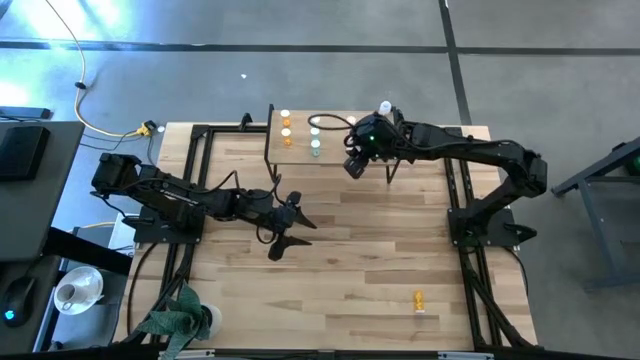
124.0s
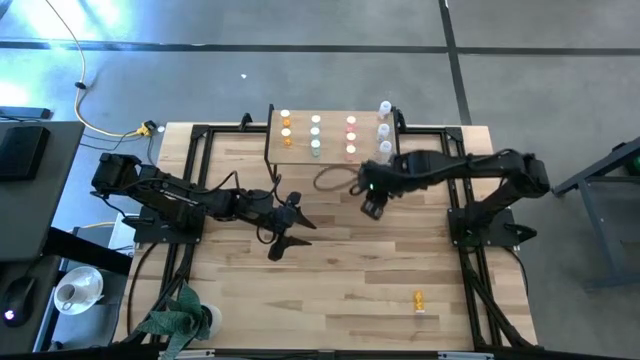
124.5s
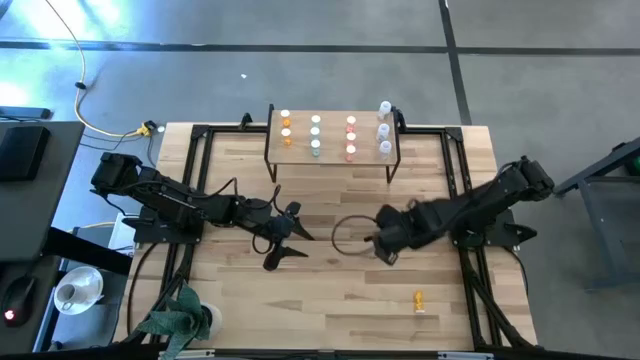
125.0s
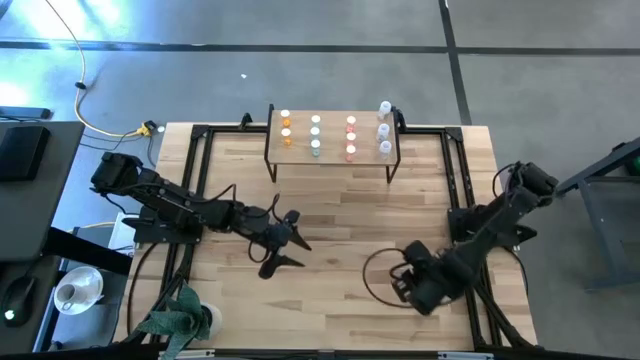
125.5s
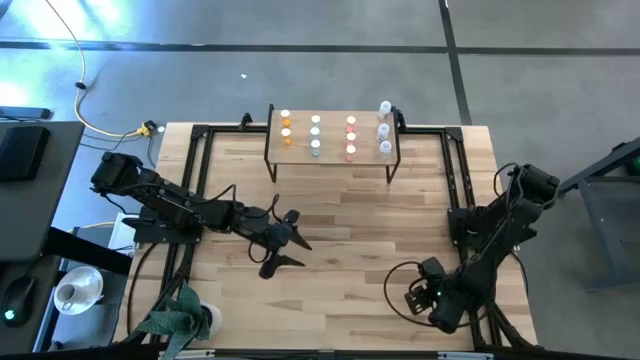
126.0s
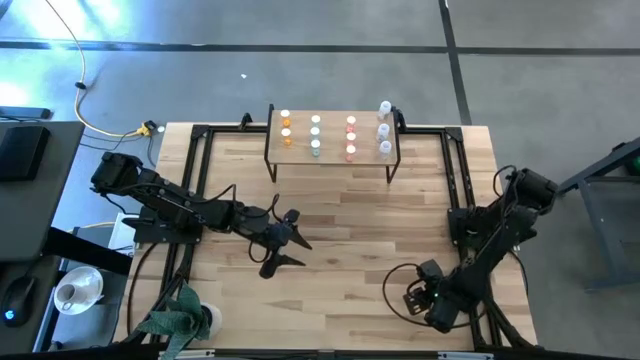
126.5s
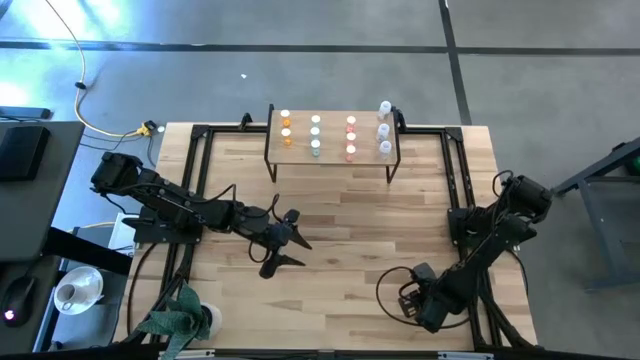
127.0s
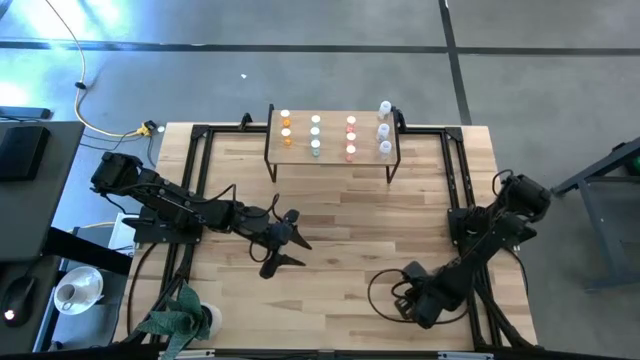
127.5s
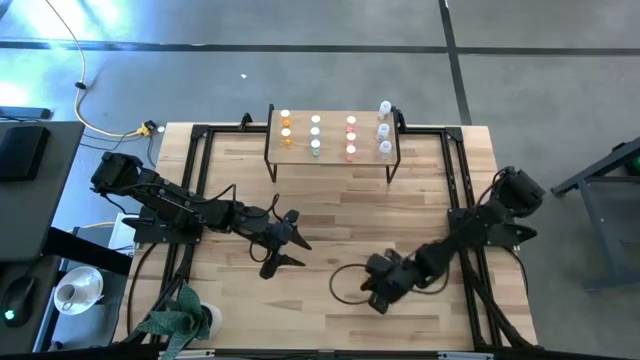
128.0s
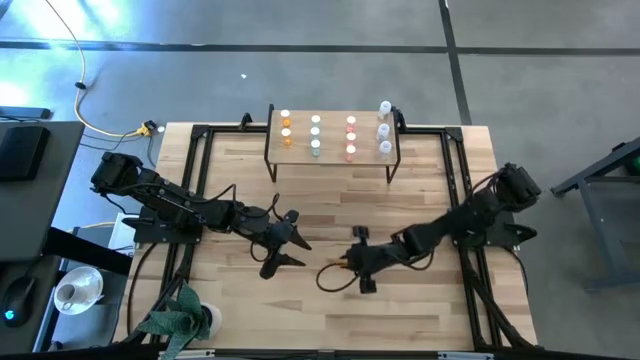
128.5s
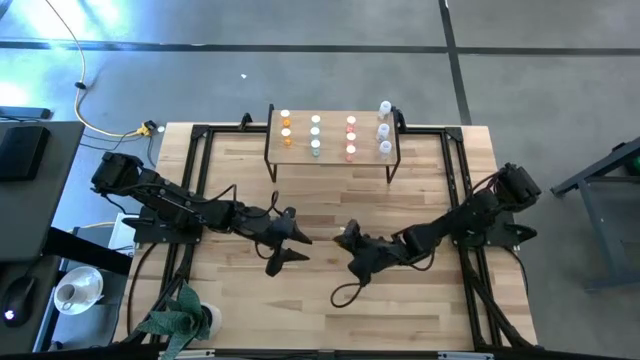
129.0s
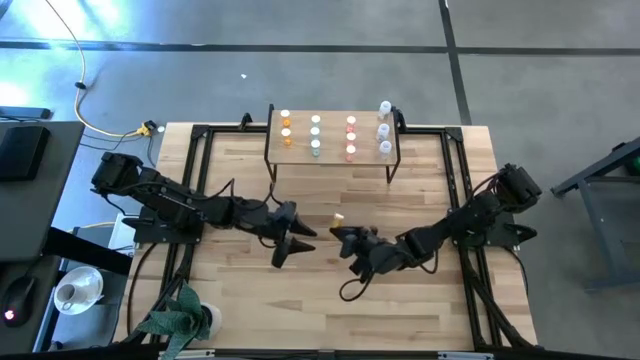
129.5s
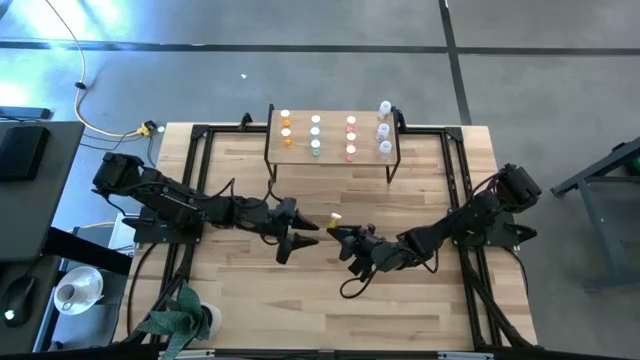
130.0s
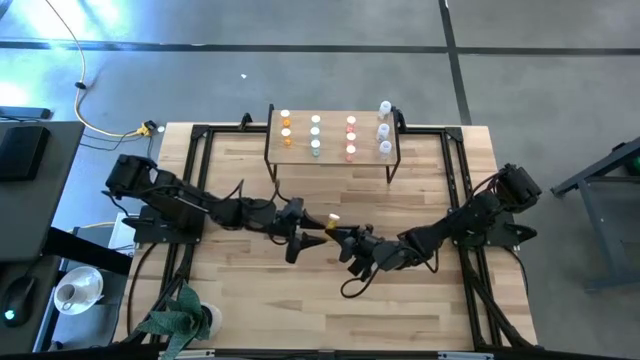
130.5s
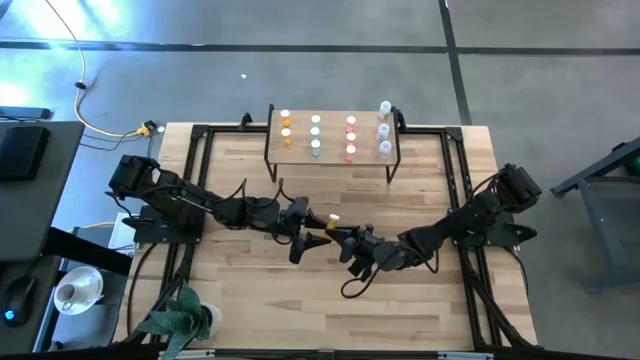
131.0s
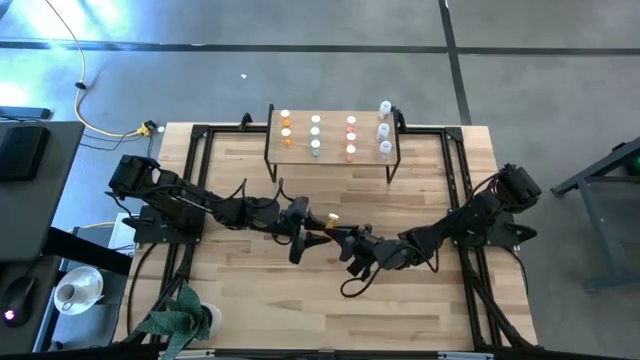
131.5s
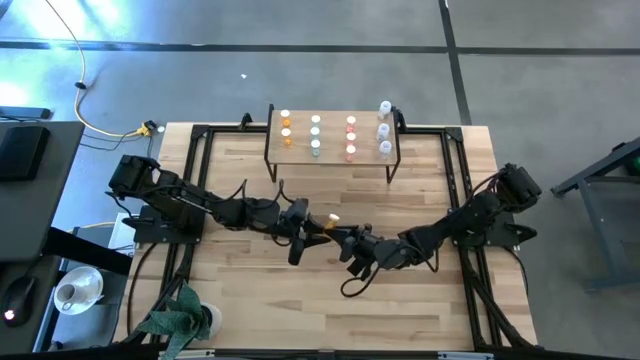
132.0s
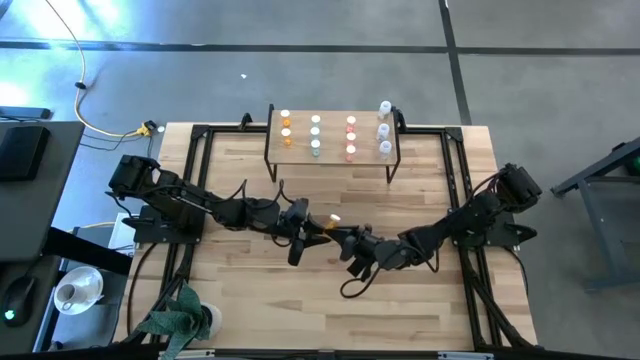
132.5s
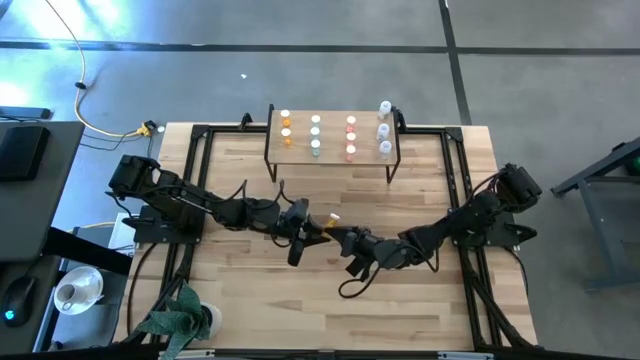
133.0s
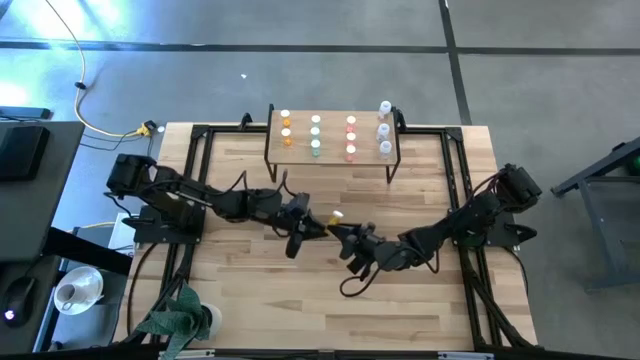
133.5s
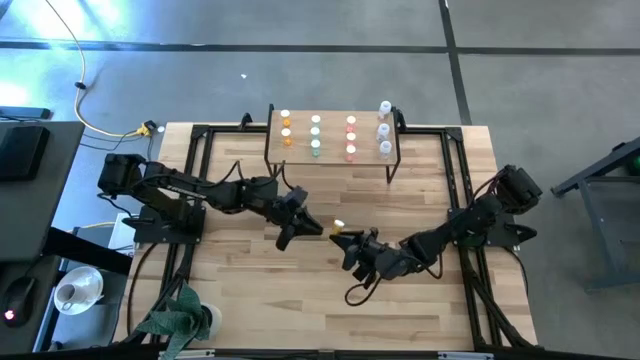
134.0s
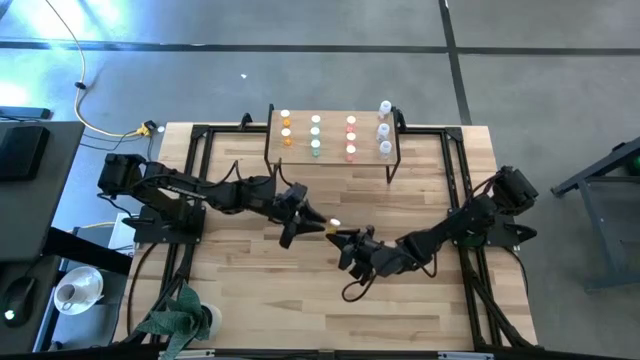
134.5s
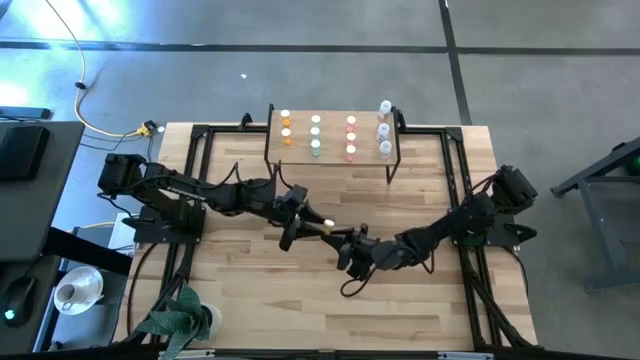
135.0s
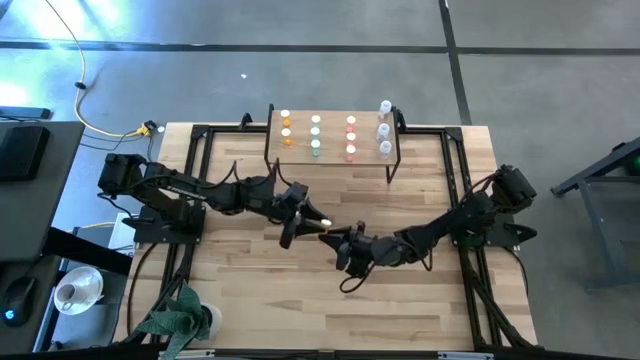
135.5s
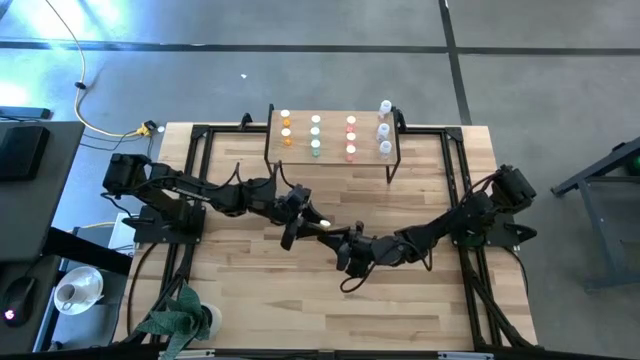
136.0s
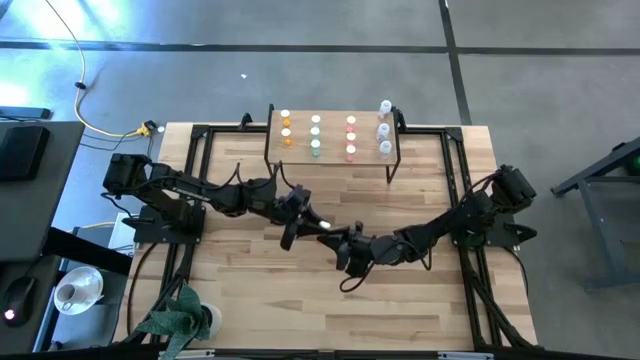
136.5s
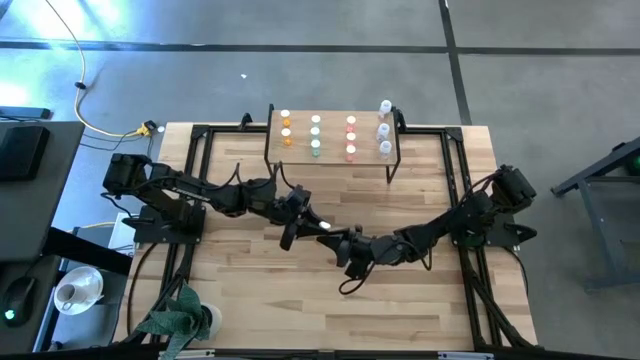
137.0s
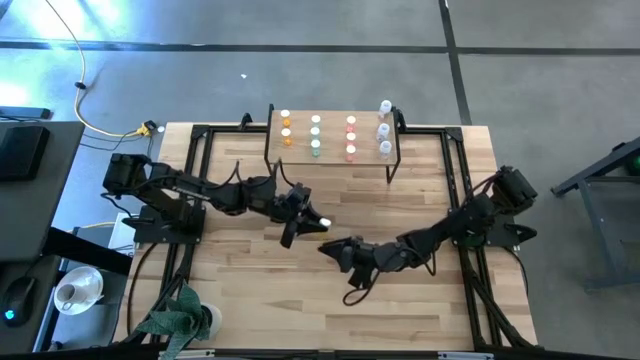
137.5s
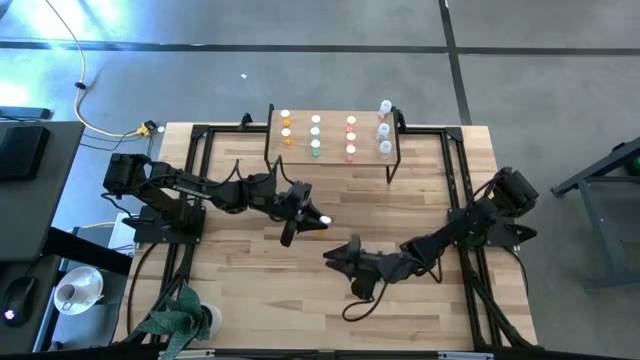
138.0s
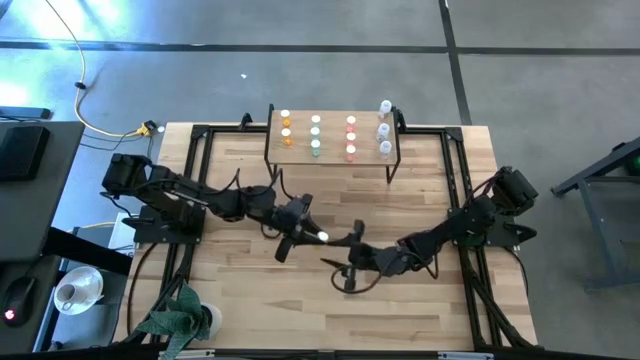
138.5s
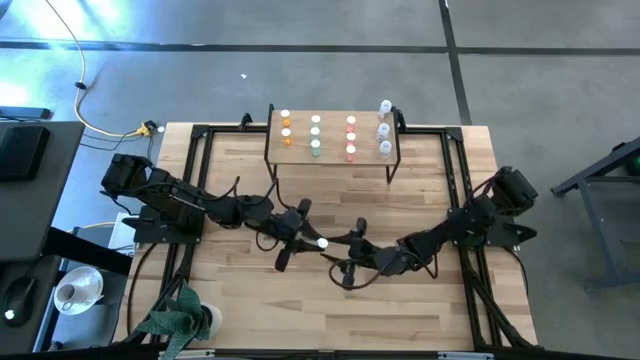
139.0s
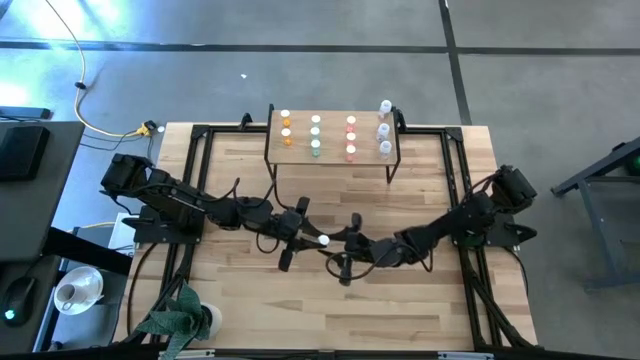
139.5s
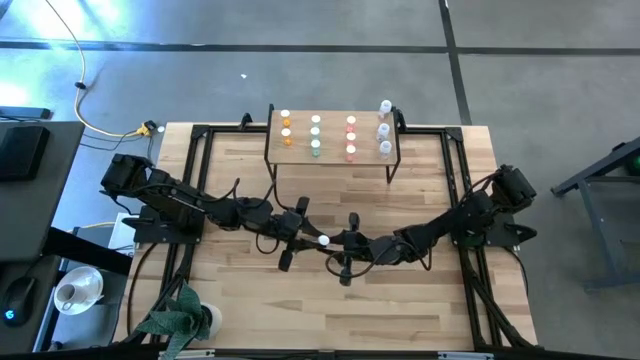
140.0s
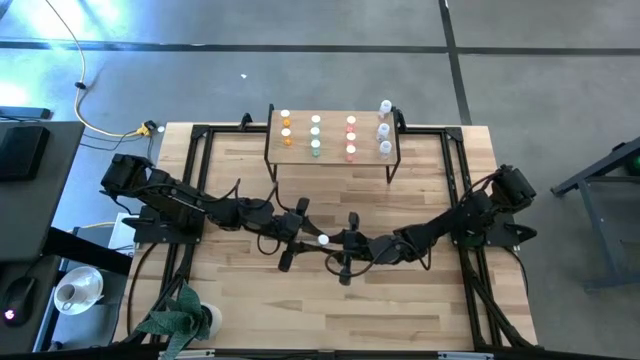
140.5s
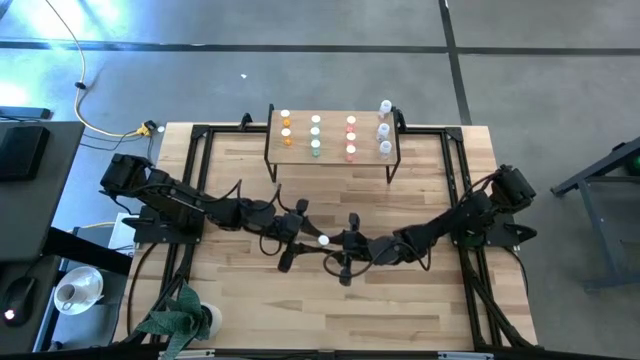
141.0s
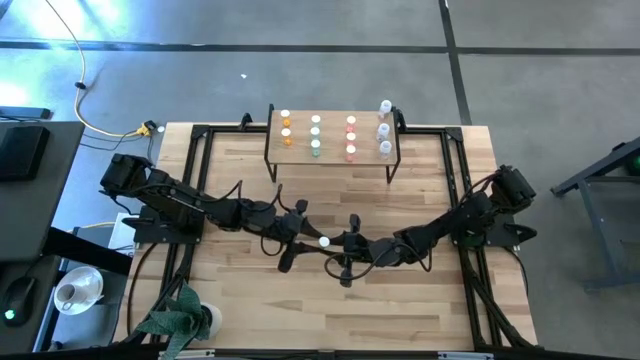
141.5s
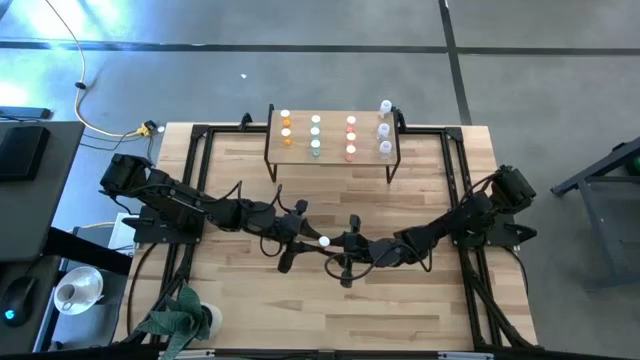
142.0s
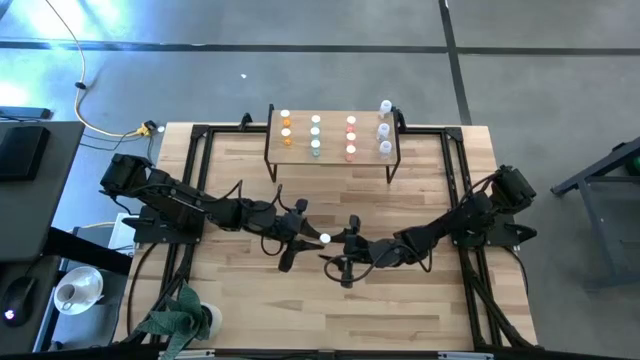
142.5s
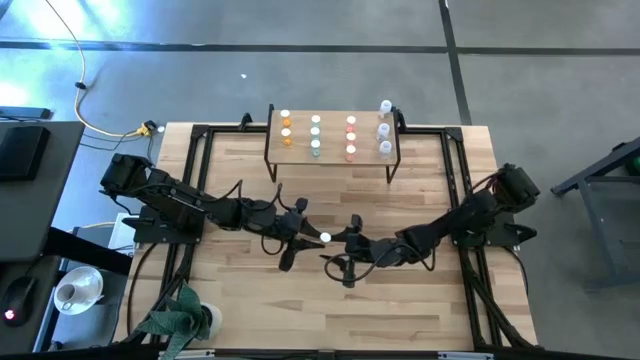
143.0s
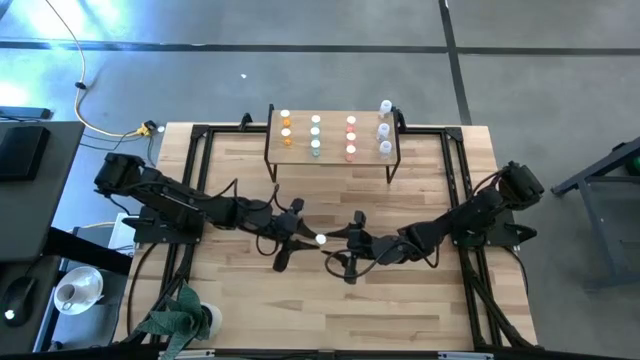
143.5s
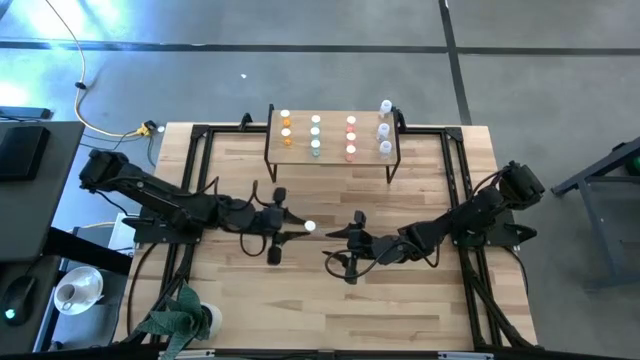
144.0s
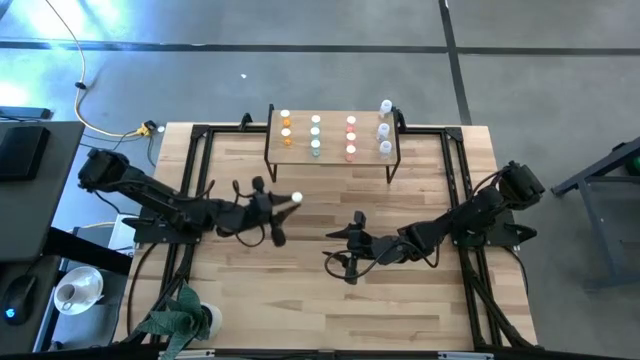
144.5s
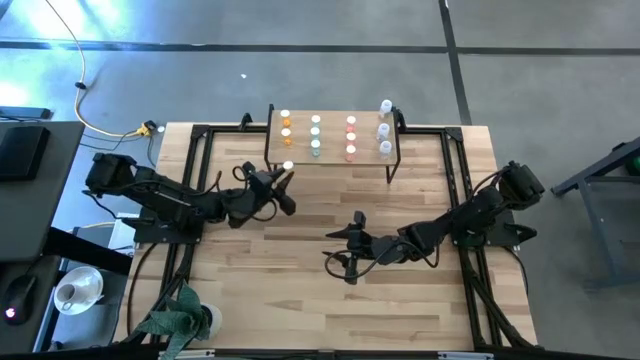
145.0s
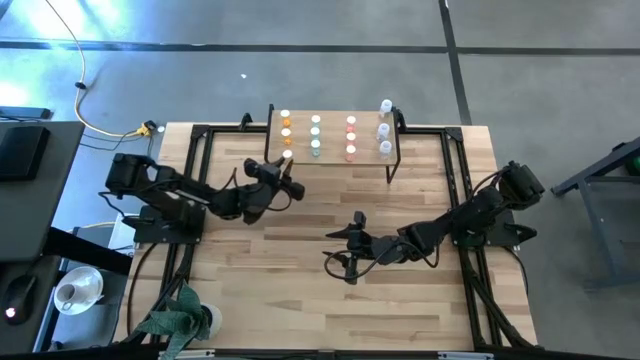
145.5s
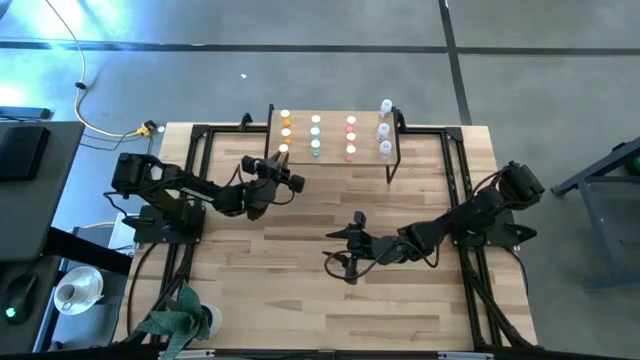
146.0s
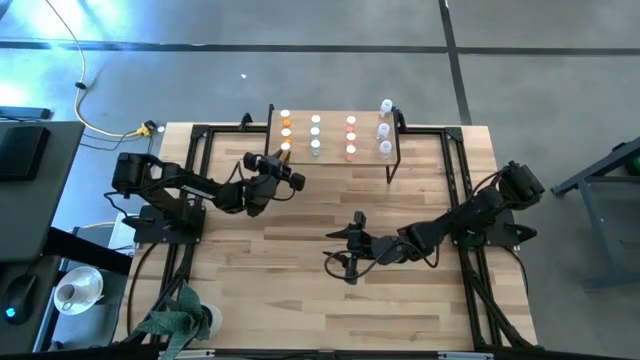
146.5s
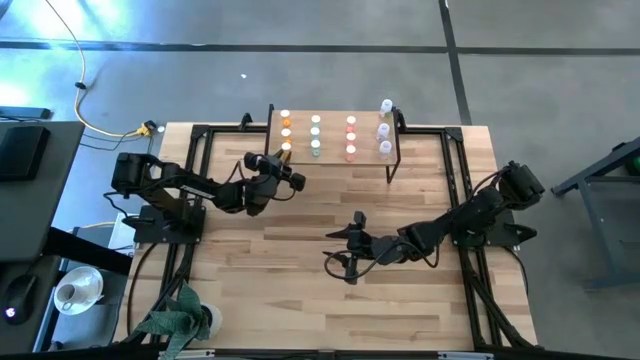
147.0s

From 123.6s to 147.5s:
Task: Pick and place medicine bottles onto shelf by color
Put the orange pill bottle on the shelf
